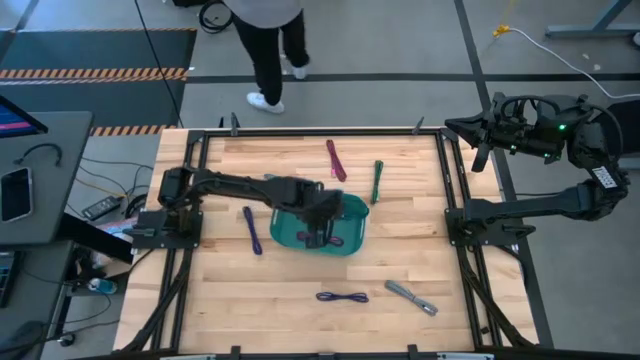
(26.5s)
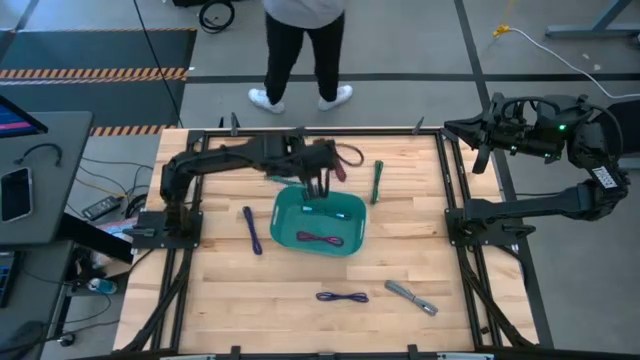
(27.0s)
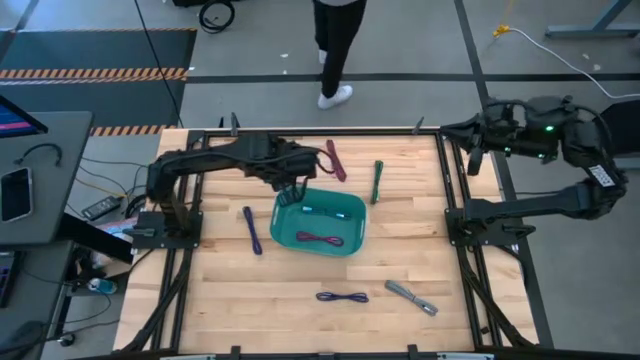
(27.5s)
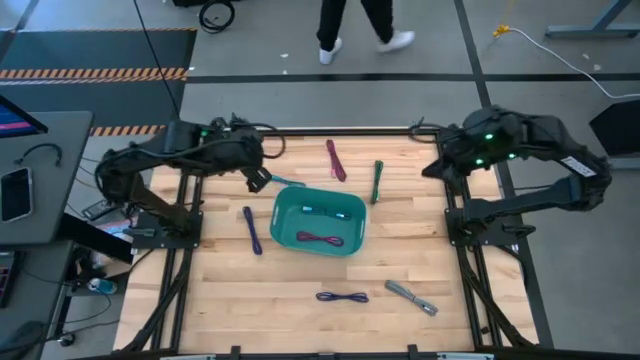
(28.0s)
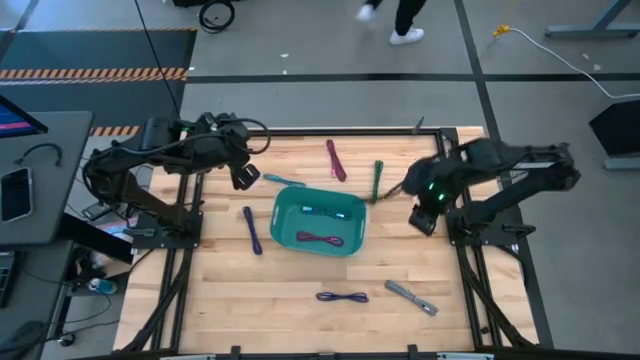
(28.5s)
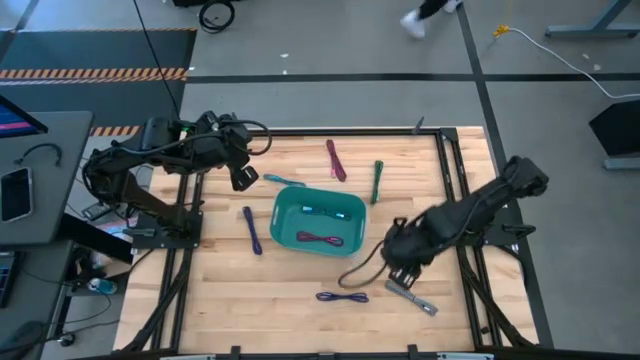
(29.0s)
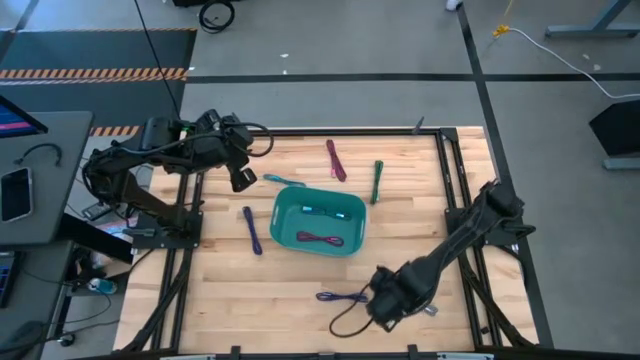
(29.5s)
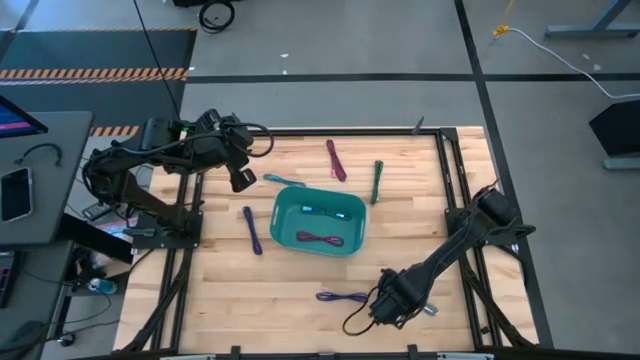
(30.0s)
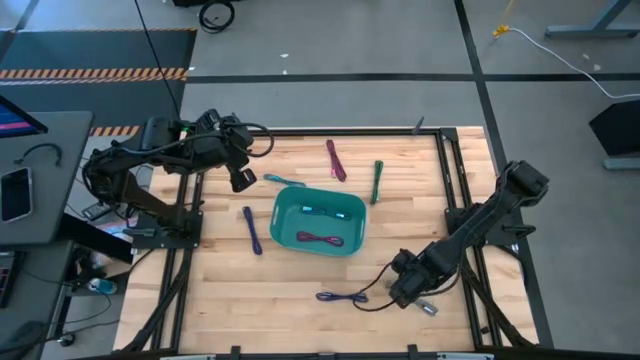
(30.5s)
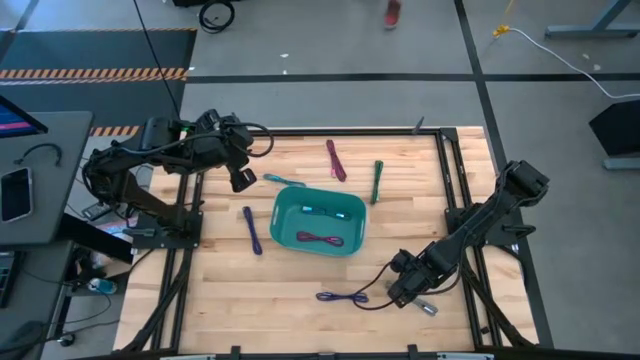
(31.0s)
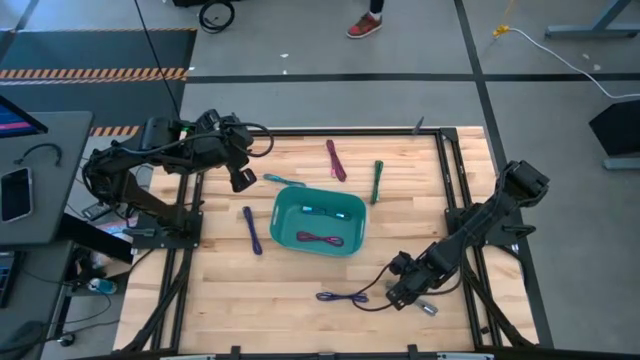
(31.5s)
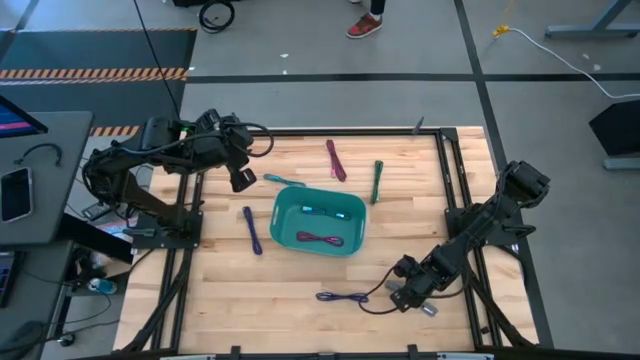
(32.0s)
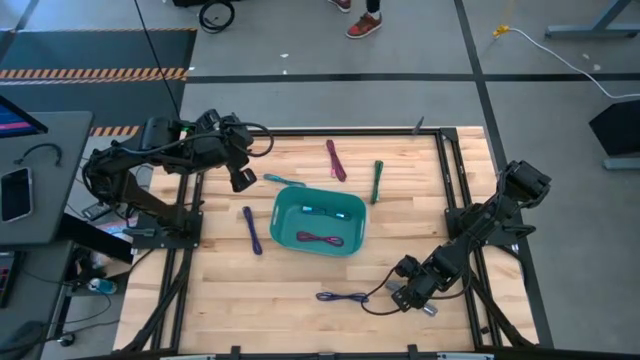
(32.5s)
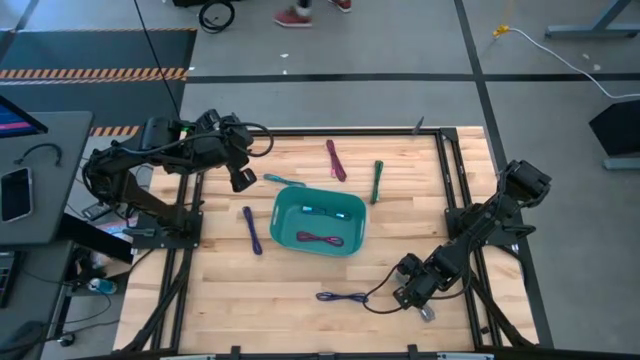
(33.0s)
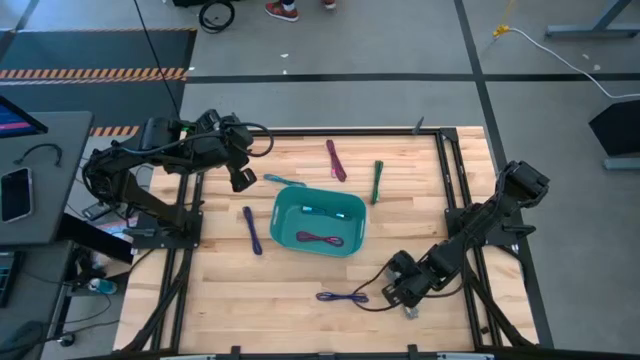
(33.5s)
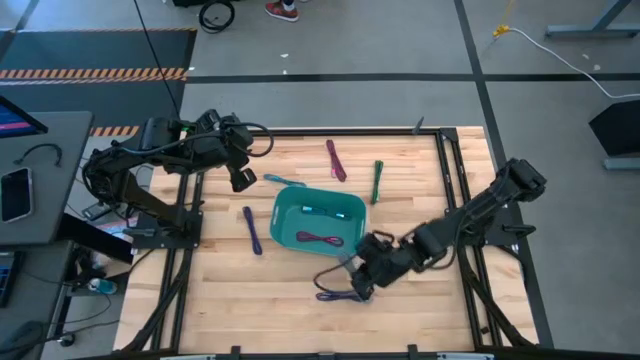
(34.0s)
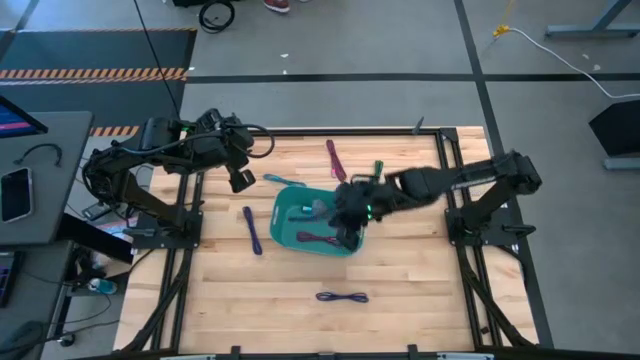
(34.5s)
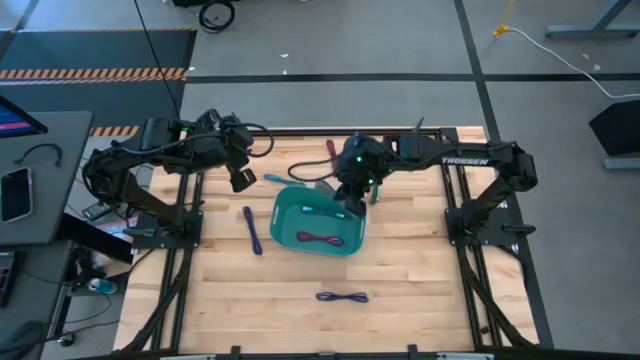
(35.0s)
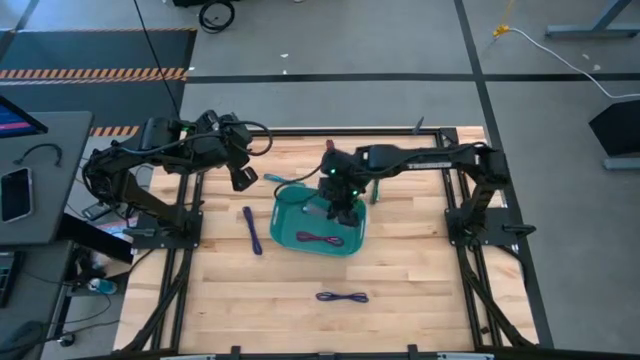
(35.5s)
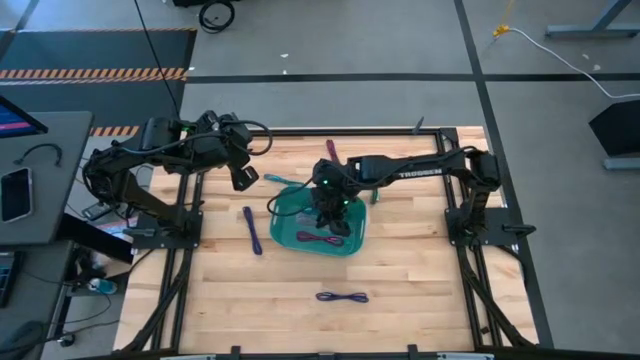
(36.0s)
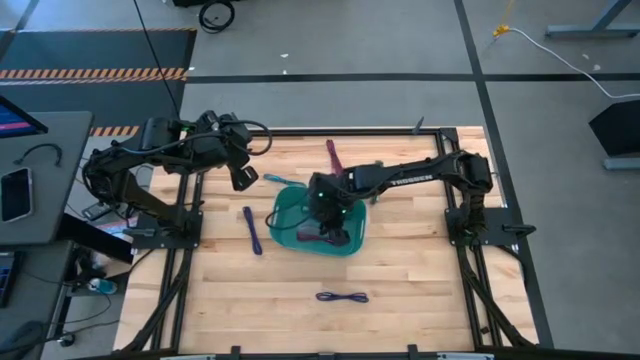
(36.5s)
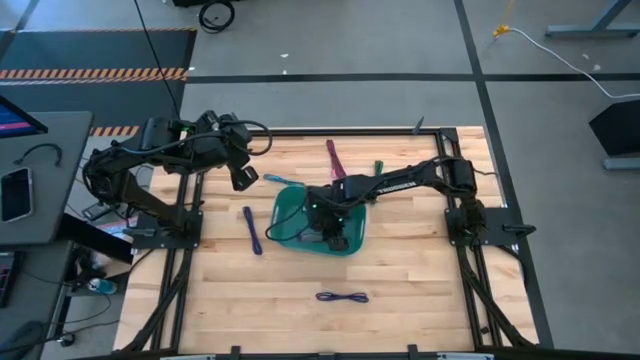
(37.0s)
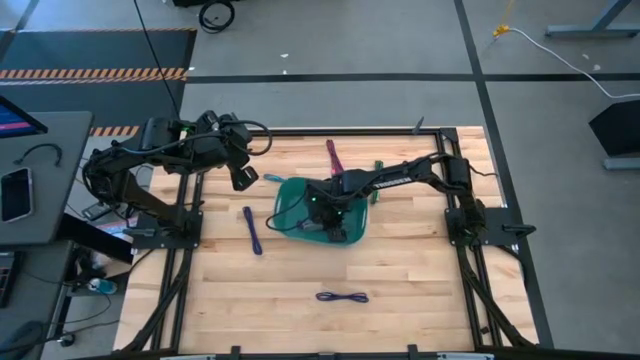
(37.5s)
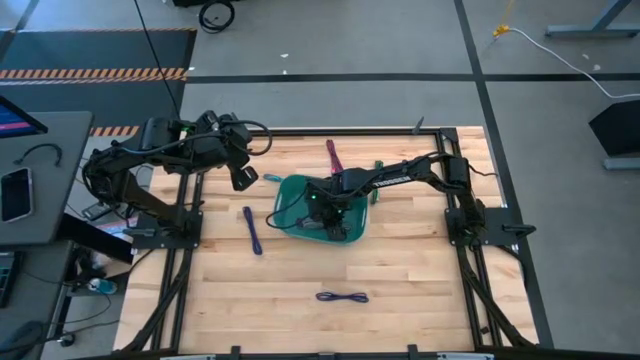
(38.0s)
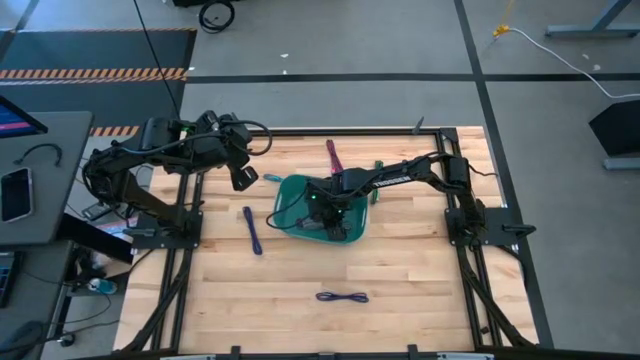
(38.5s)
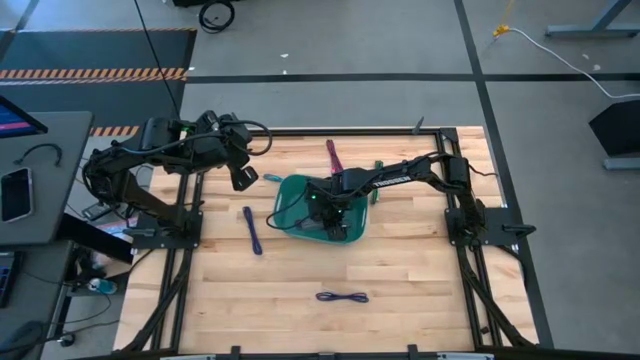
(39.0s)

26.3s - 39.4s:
Task: Pick and place USB-C Cables
Put the white charger cable into the blue bin

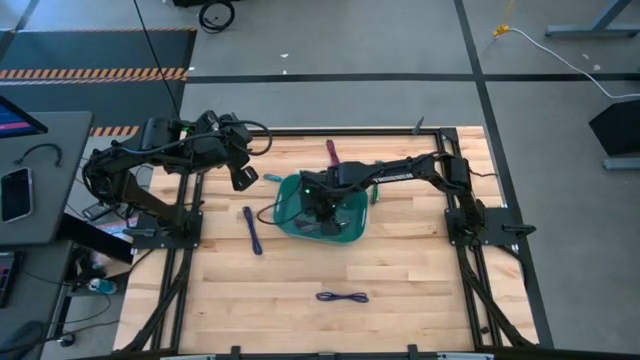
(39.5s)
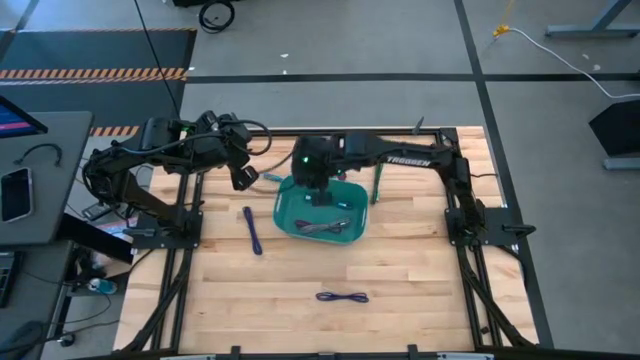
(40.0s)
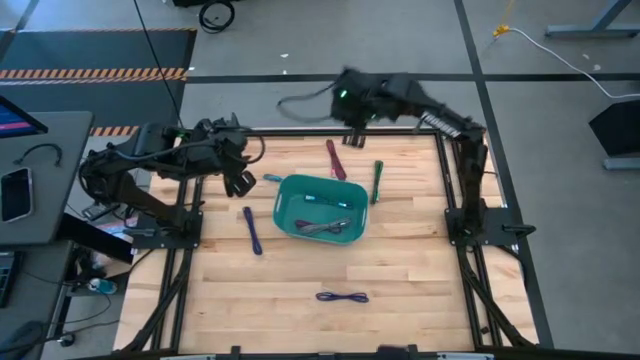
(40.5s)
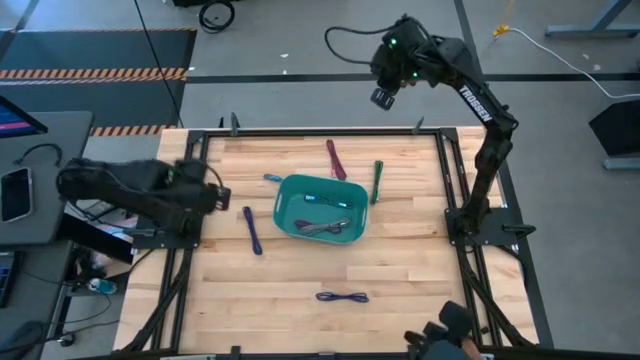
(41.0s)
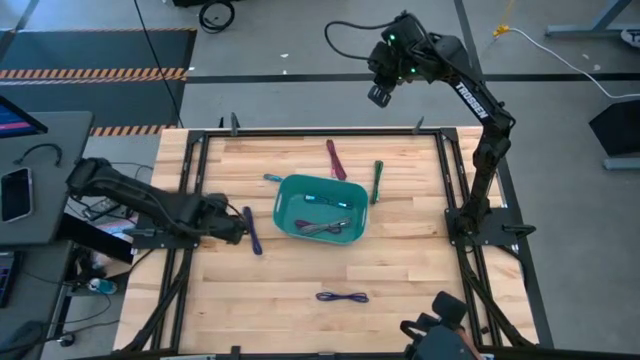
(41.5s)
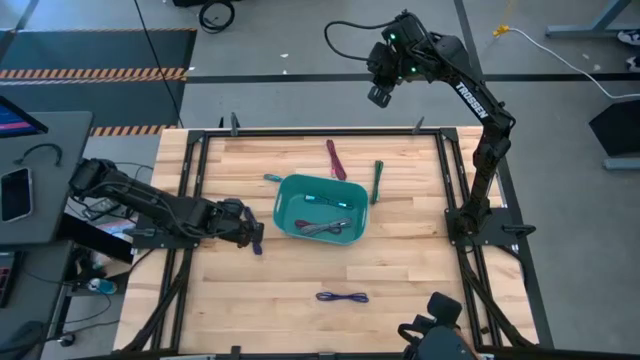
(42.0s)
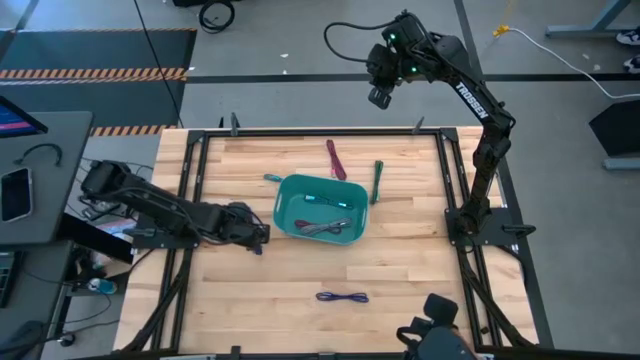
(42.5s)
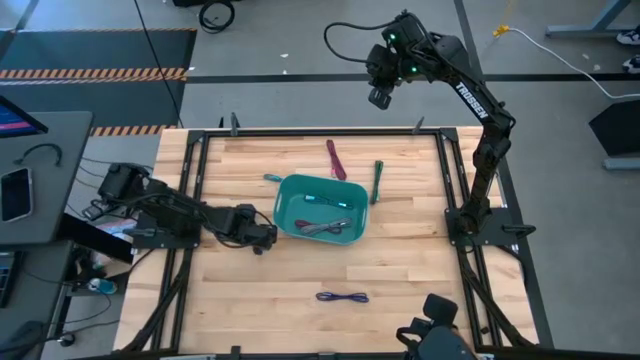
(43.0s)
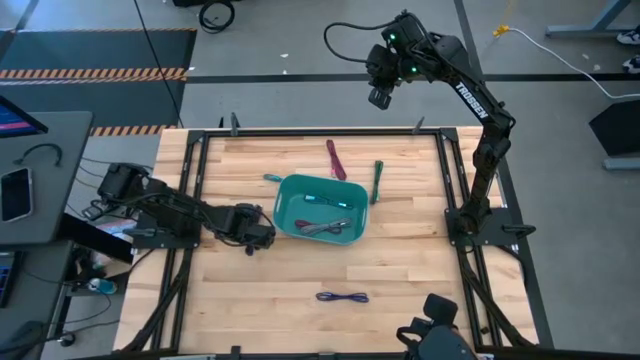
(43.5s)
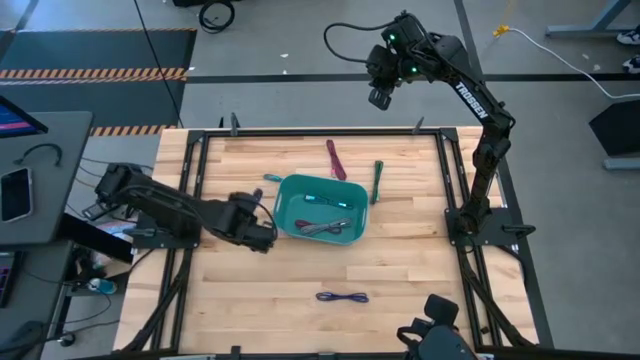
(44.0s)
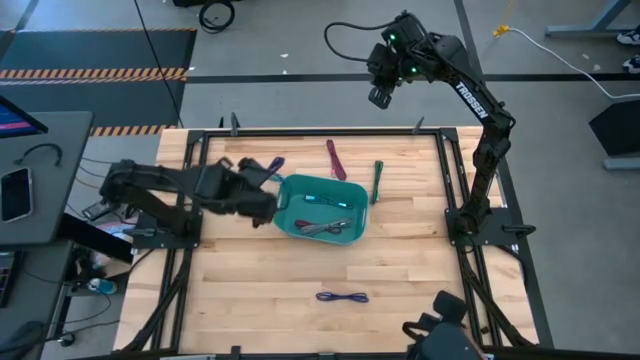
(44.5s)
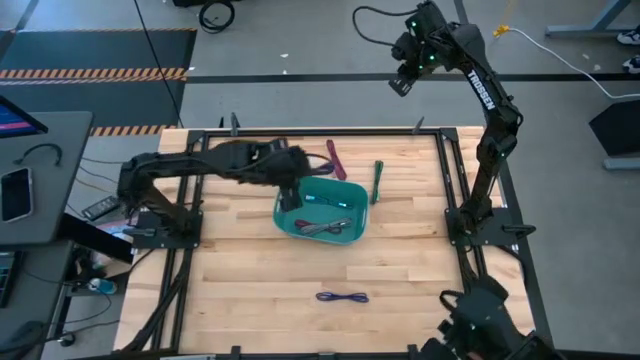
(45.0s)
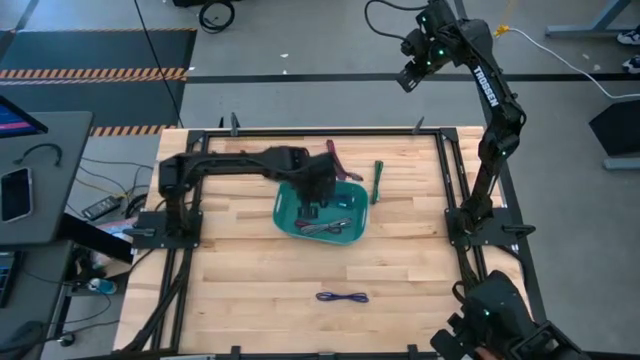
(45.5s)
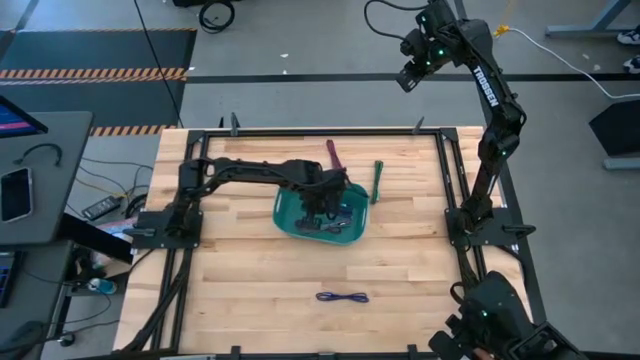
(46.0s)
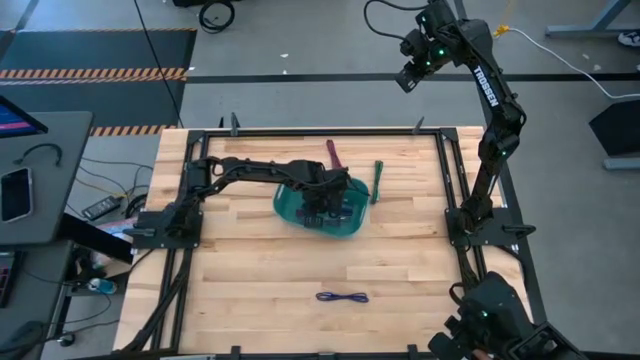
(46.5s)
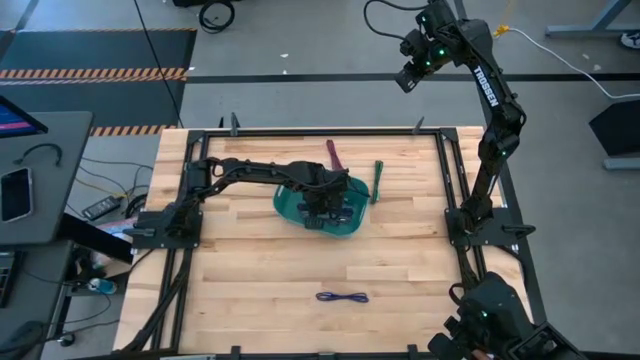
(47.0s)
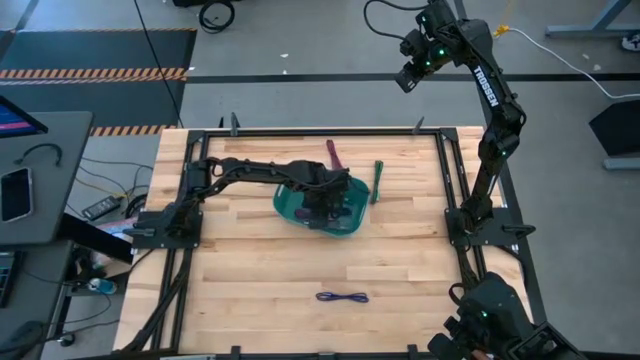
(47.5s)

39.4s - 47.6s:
Put the top purple charger cable into the blue bin
